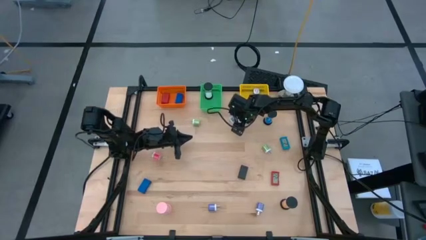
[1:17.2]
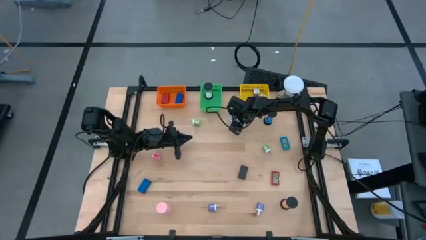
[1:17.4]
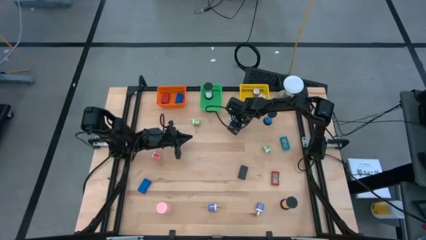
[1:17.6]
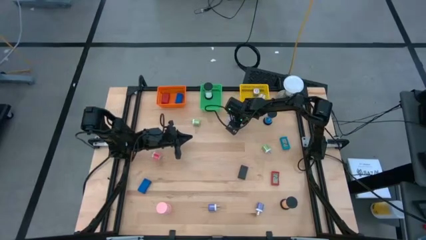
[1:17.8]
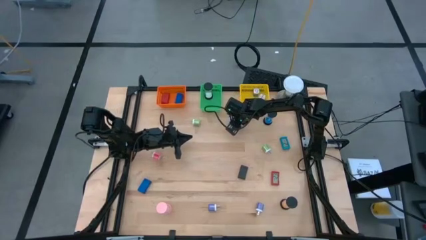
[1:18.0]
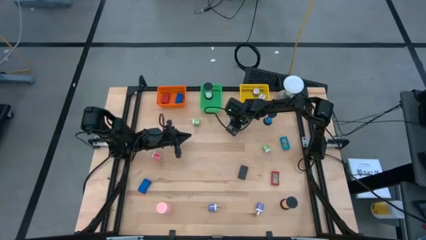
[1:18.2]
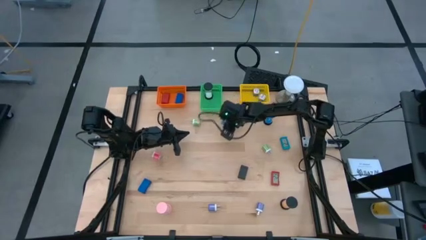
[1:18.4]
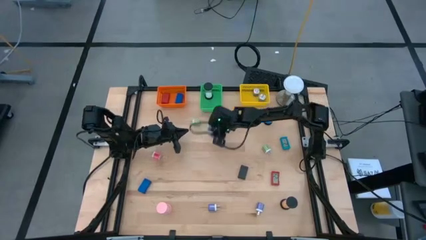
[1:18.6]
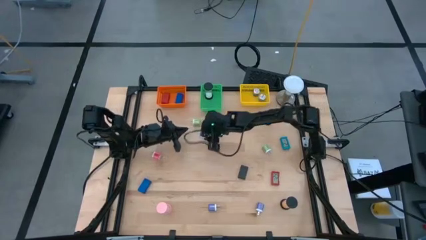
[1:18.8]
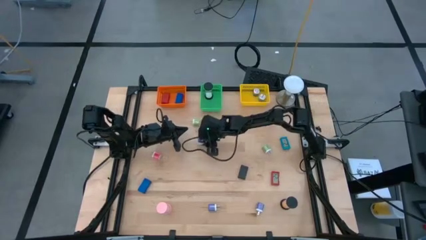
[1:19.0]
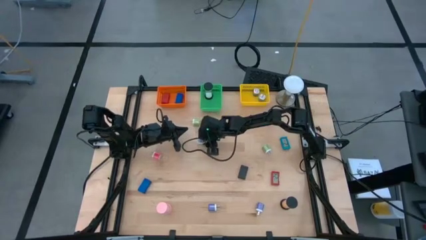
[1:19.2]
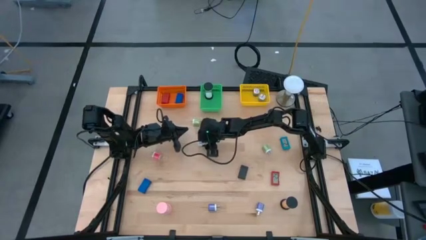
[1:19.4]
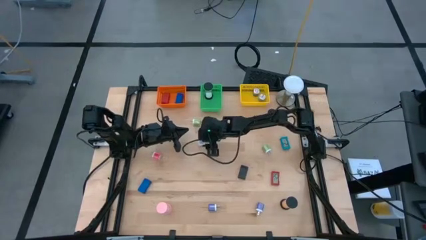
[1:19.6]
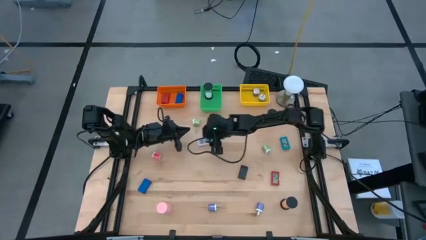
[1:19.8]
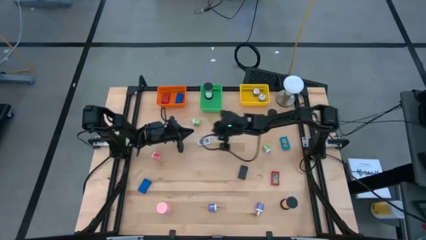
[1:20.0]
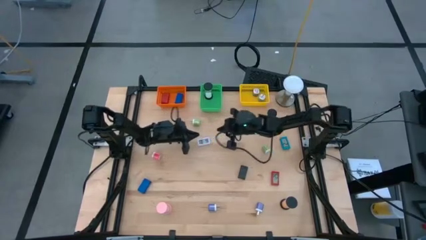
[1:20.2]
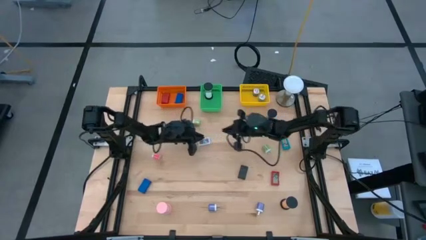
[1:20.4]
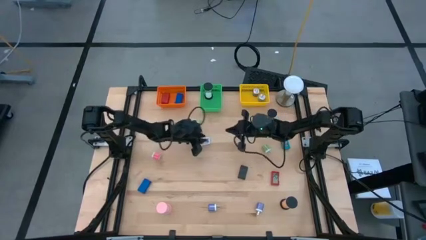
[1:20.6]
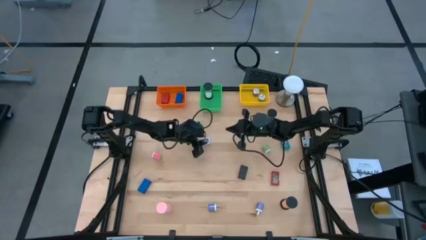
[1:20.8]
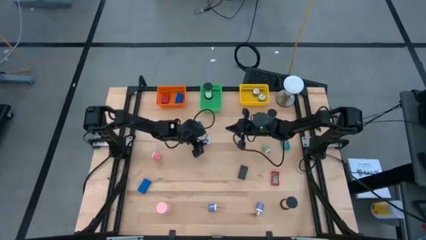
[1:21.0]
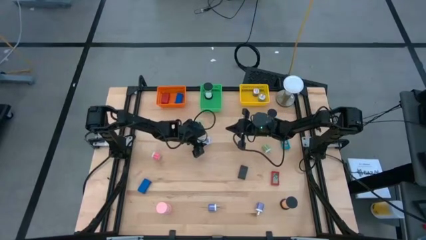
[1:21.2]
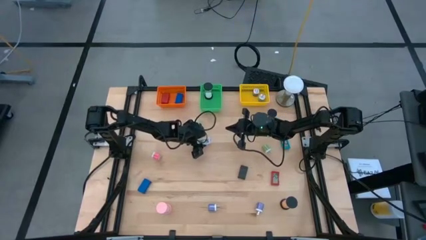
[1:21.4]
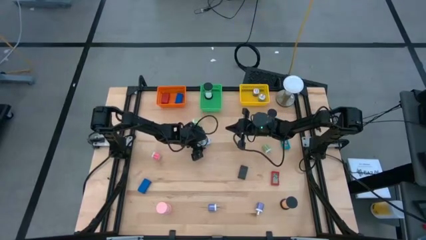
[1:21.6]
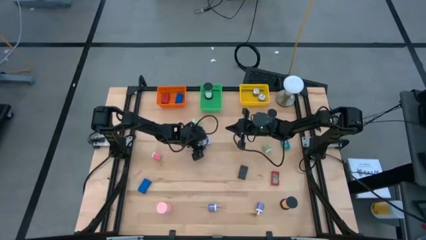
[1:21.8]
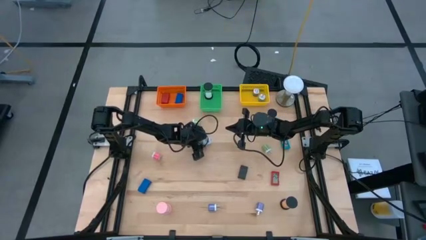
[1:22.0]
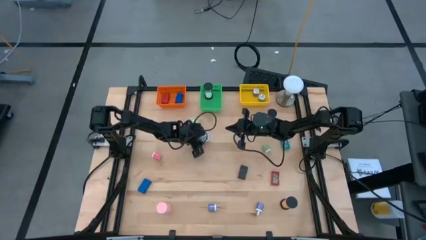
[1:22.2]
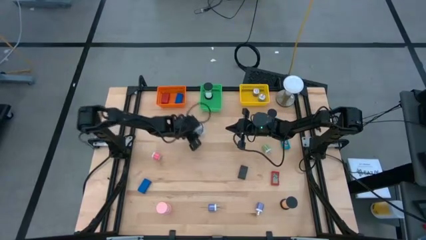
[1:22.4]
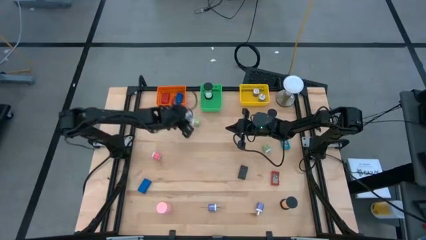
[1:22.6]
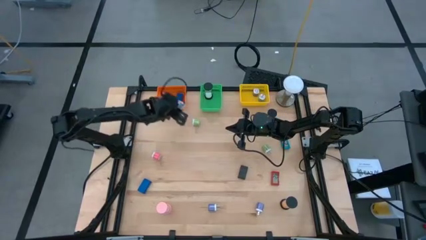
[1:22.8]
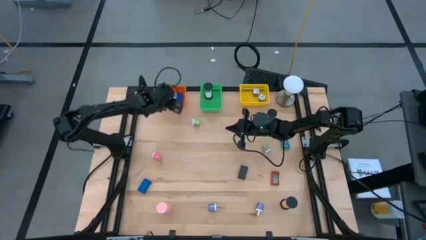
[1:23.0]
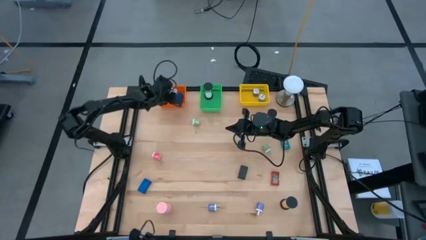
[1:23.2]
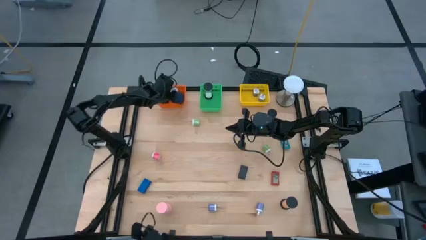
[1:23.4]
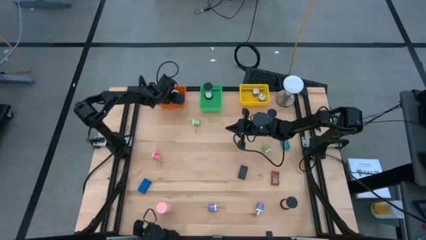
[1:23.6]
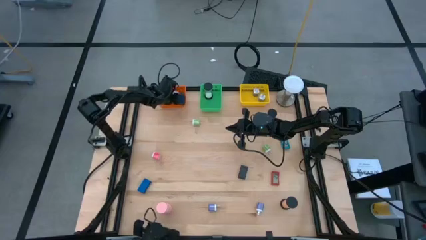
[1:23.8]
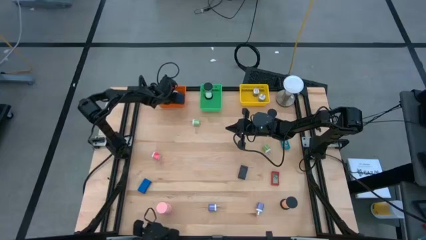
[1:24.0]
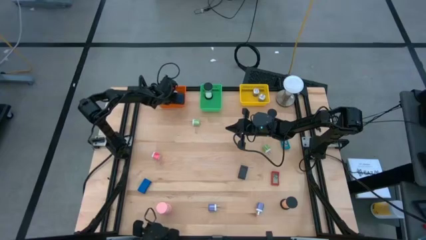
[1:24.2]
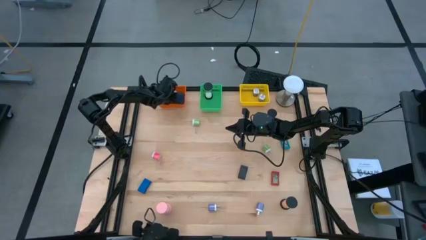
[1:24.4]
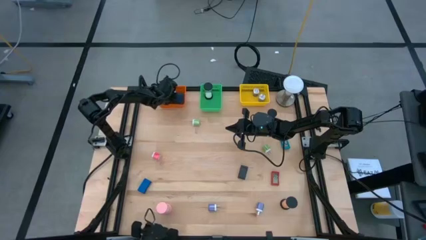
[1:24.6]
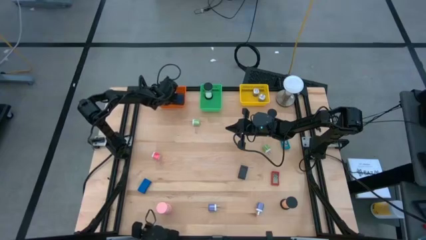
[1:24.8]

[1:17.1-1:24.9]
Task: Pick & Place Office items
Put the white digital clock into the orange bin
